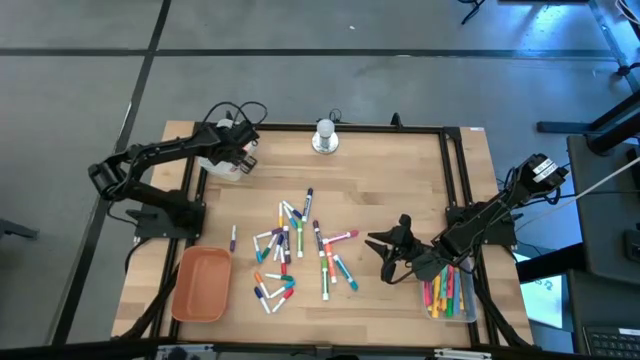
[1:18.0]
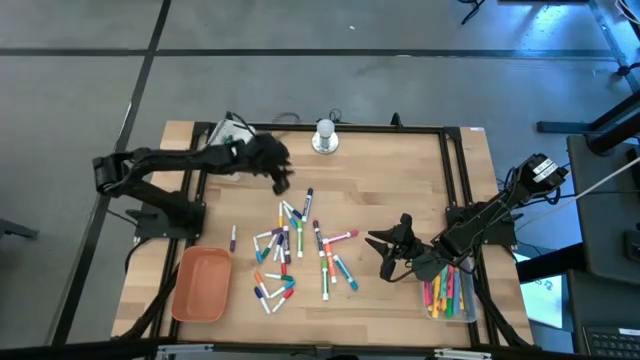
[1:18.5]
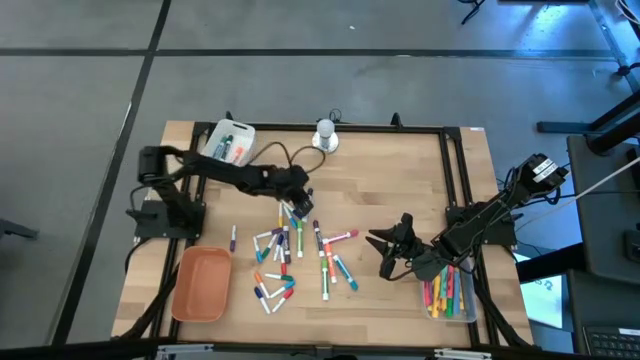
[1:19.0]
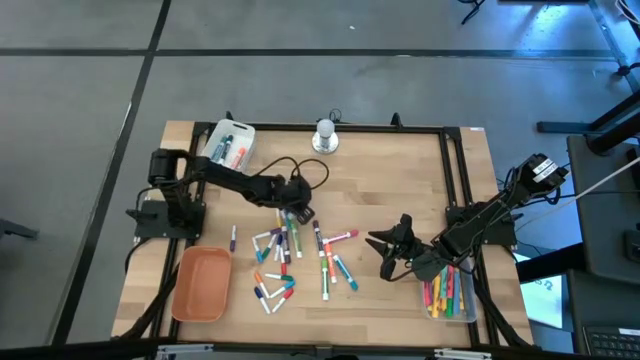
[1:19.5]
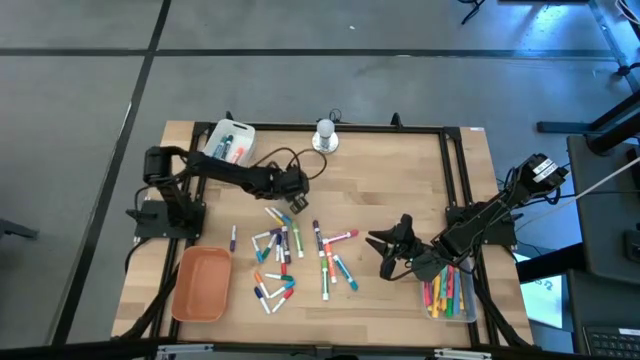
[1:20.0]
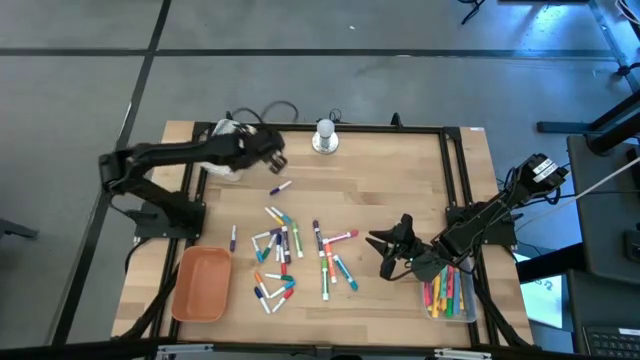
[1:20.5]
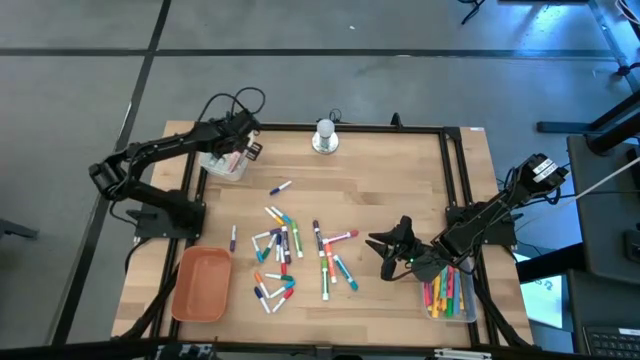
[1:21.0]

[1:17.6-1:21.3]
Task: Pick & Place Markers
Put the dark blue marker pen into the white bin

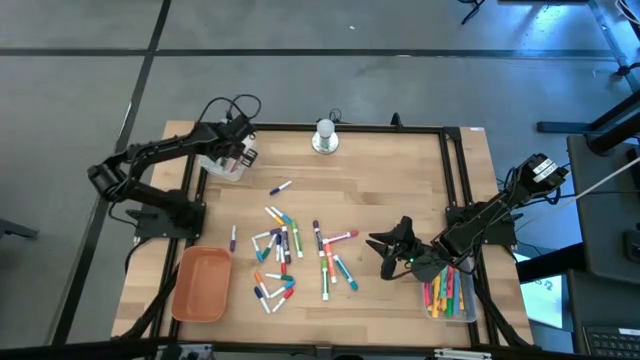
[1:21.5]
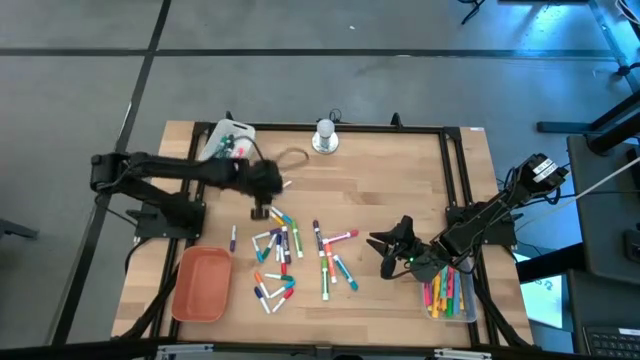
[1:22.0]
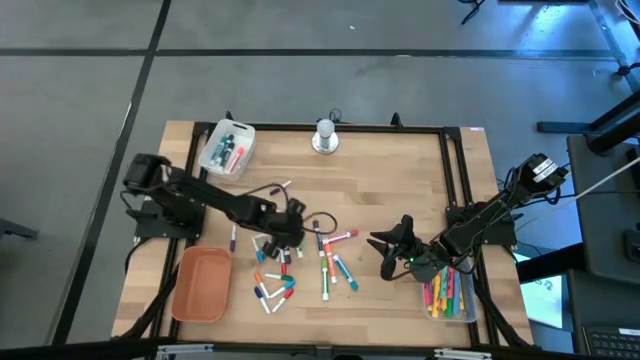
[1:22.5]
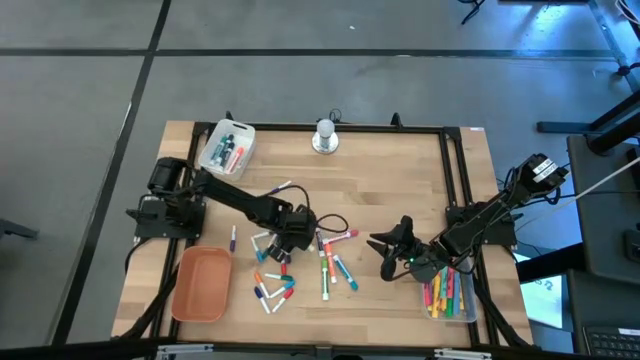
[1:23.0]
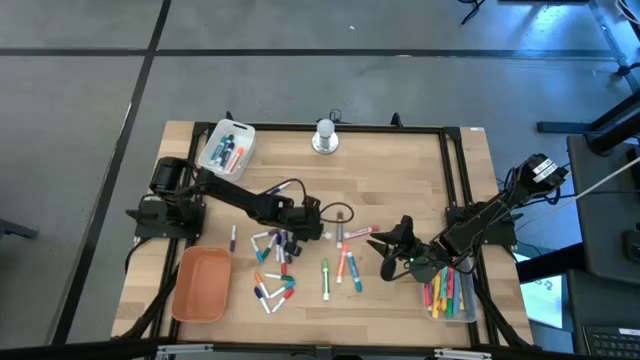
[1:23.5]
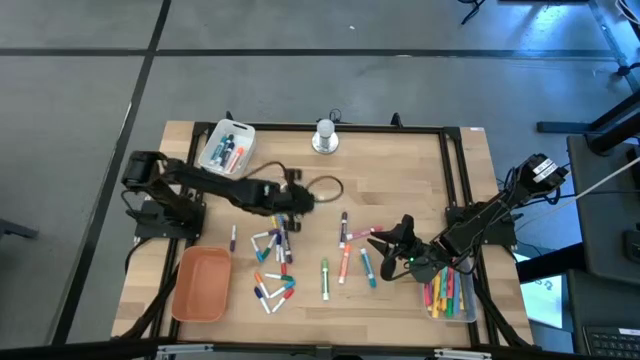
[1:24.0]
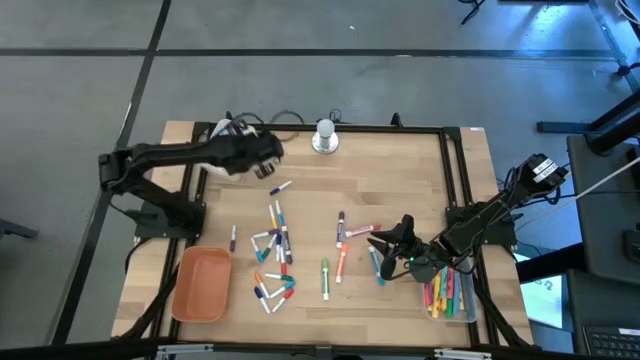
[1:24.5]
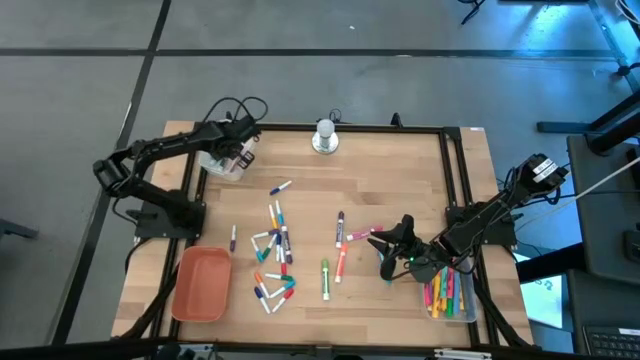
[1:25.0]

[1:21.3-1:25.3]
Put the light green marker pen into the white bin

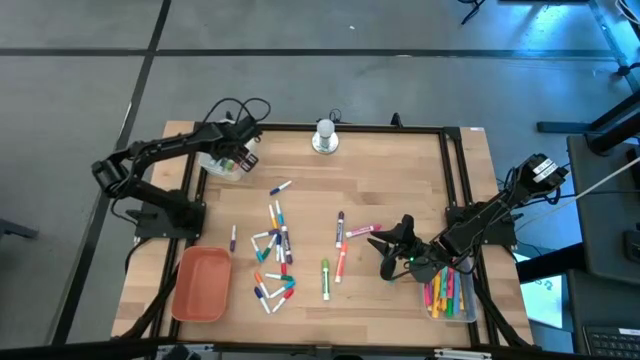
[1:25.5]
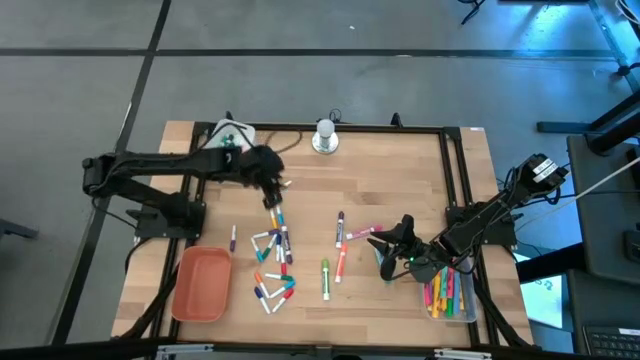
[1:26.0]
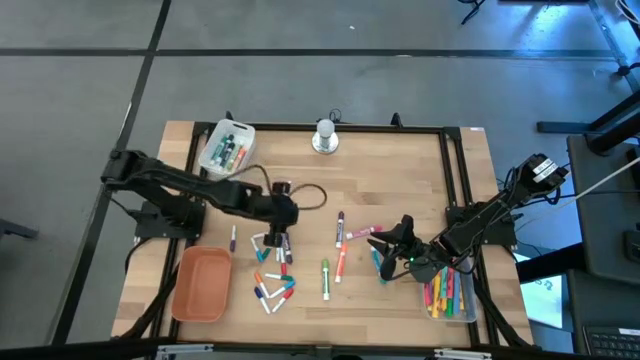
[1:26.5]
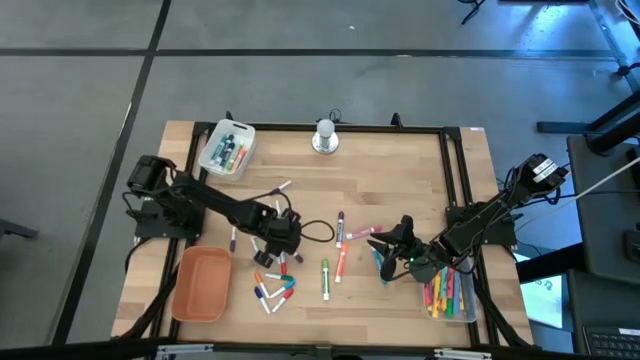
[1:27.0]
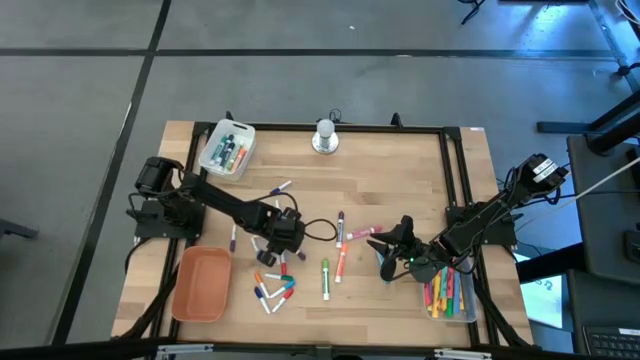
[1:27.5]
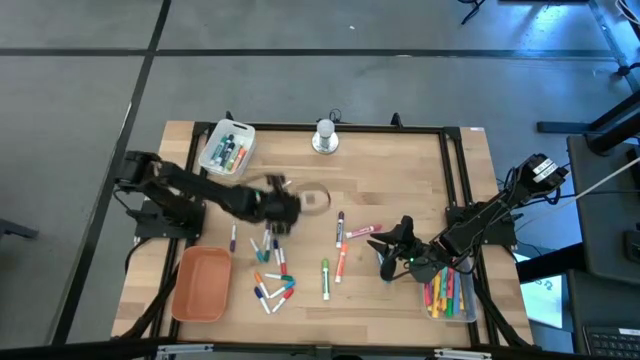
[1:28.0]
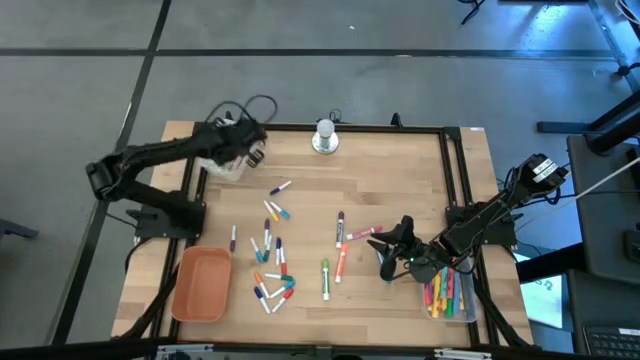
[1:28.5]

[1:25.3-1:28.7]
Put the violet marker pen into the white bin

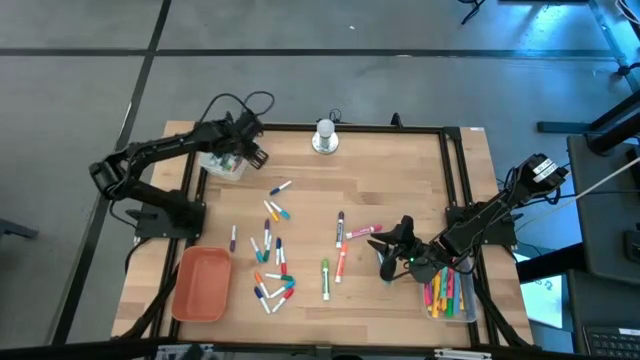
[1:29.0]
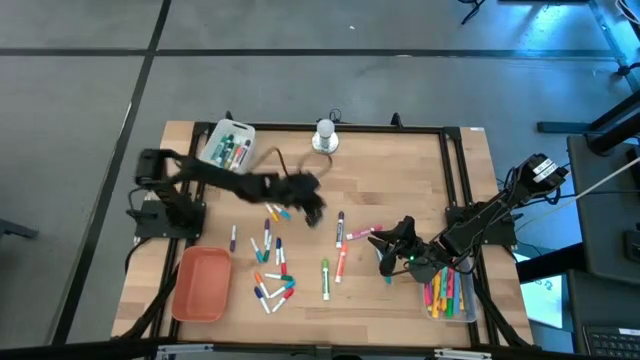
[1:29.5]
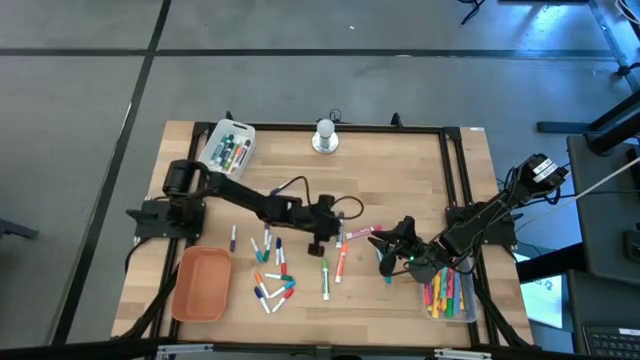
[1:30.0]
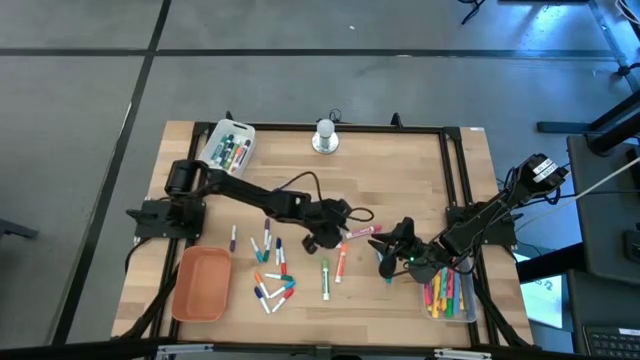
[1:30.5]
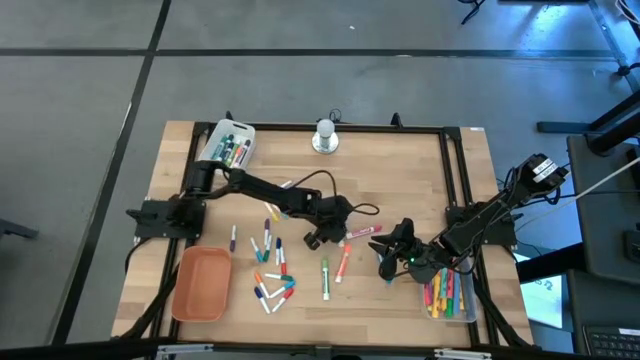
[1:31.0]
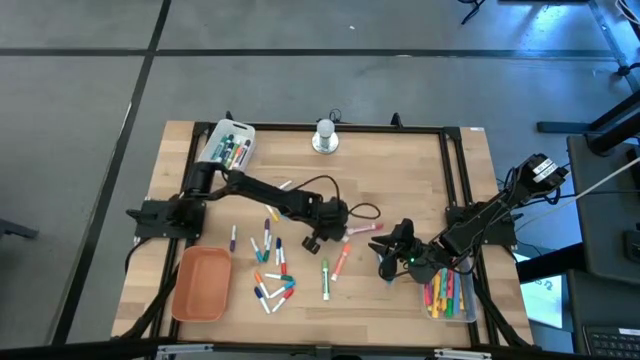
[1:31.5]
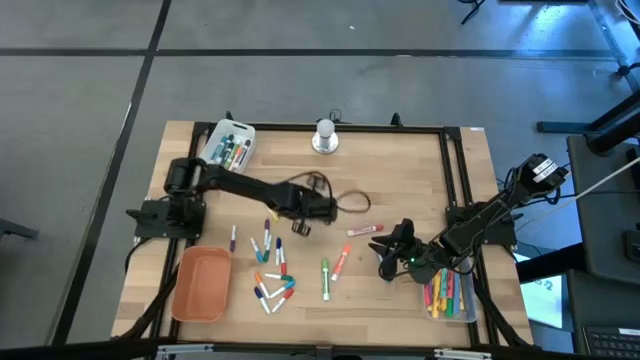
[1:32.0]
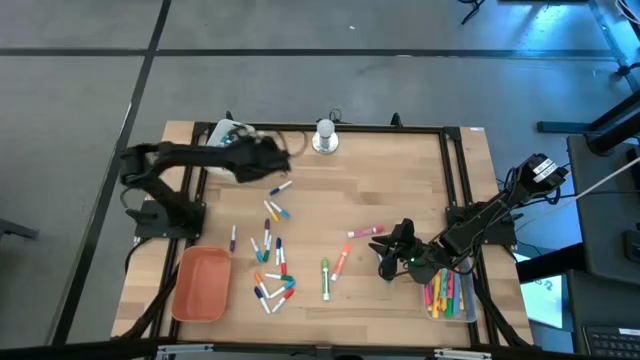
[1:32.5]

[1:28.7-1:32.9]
Put the violet marker pen into the white bin

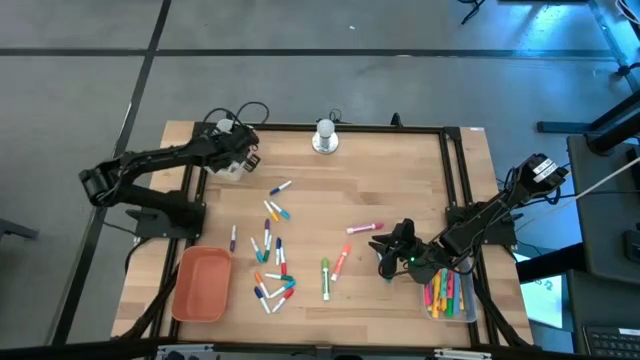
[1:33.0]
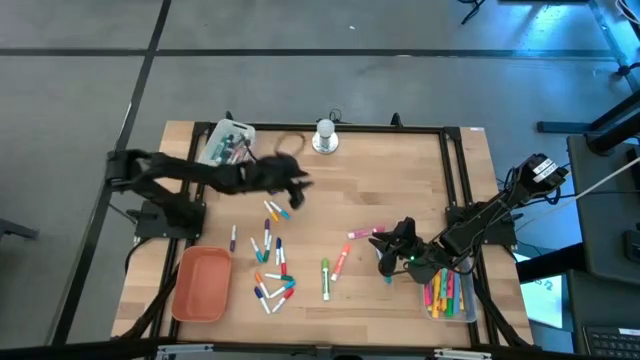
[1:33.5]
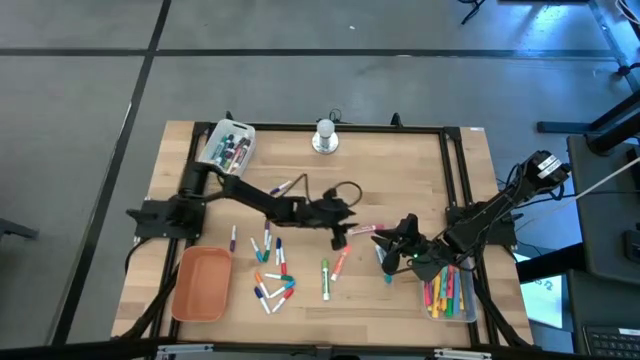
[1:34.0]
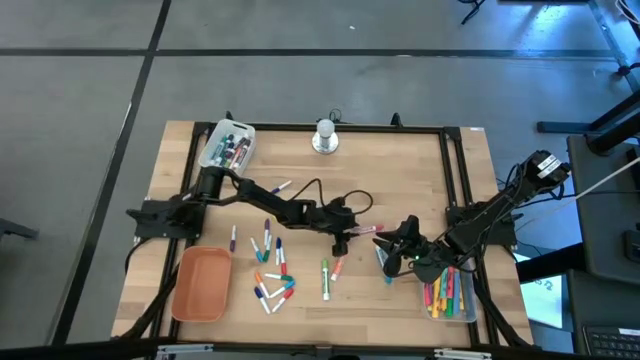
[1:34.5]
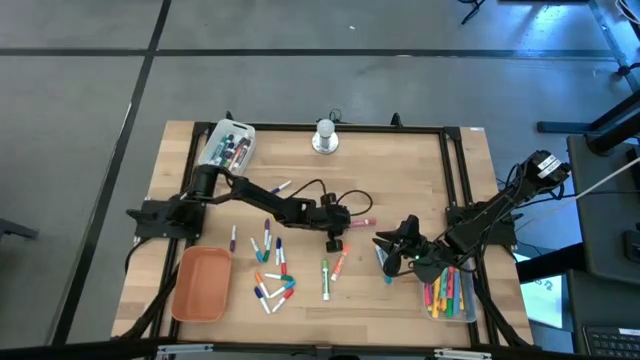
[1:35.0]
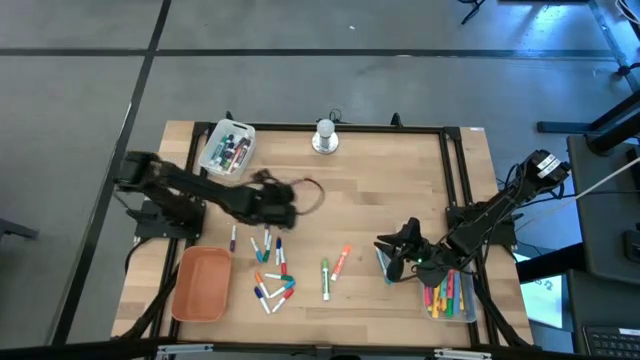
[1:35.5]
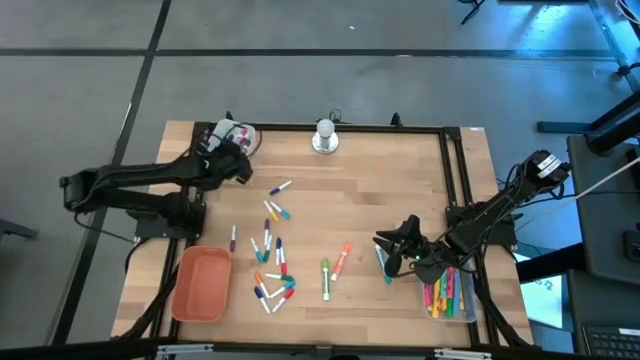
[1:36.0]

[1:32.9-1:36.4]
Put the pink marker pen into the white bin

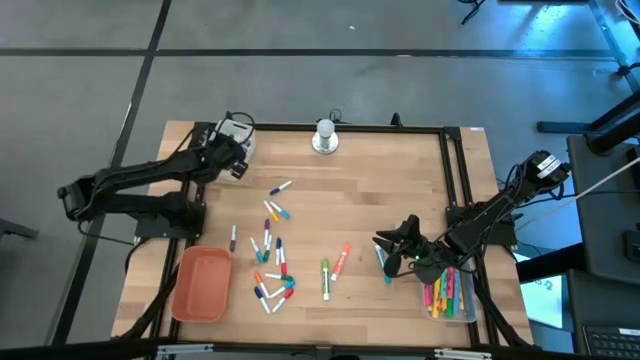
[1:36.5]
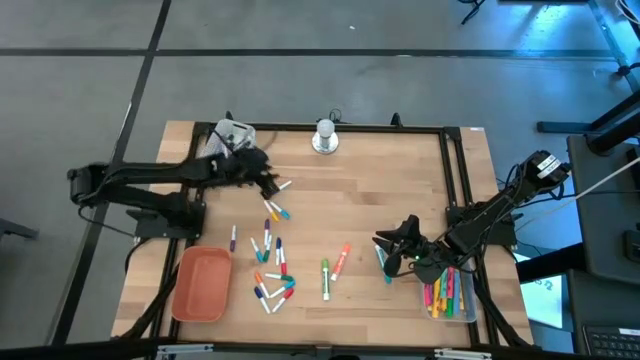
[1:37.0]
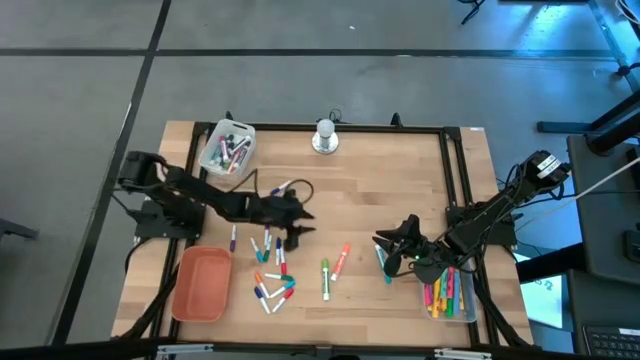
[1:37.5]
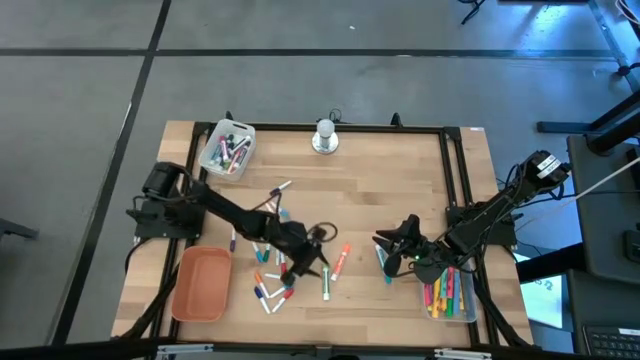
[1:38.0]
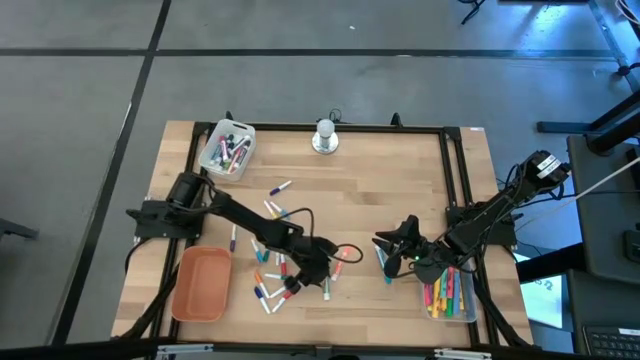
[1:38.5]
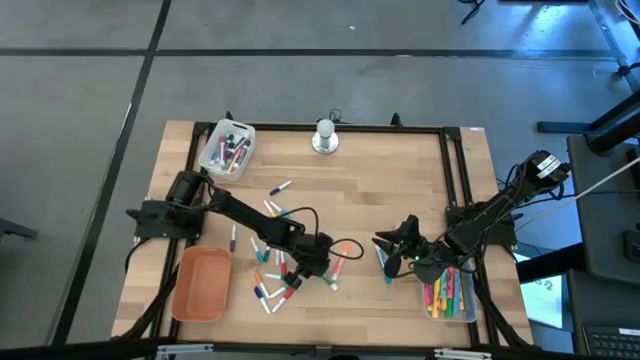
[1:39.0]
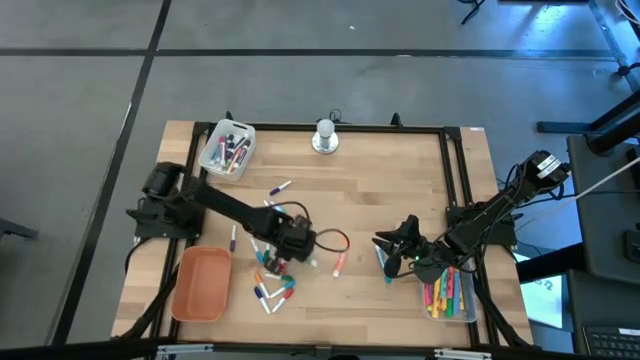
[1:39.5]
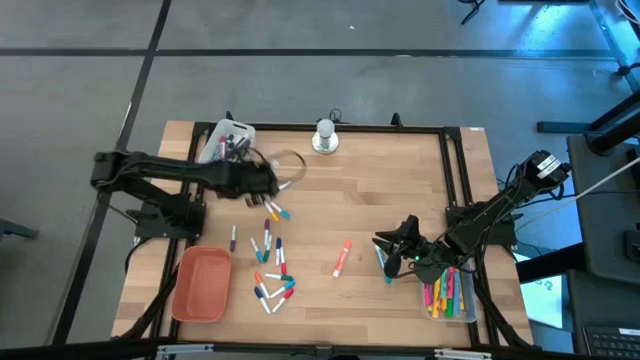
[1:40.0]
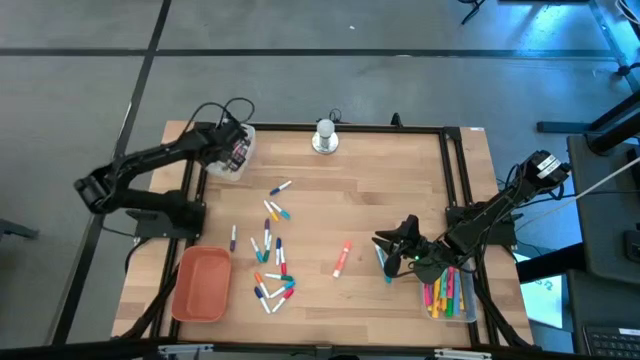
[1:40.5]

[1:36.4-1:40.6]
Put the green marker pen into the white bin
